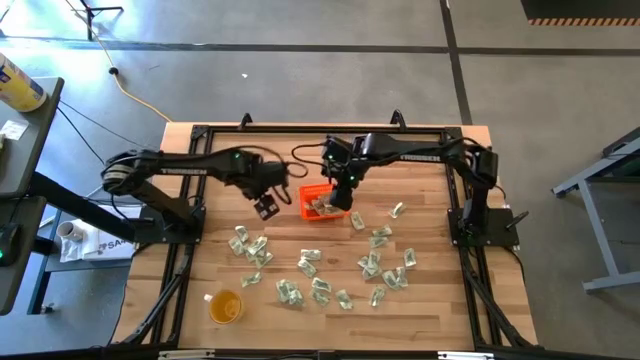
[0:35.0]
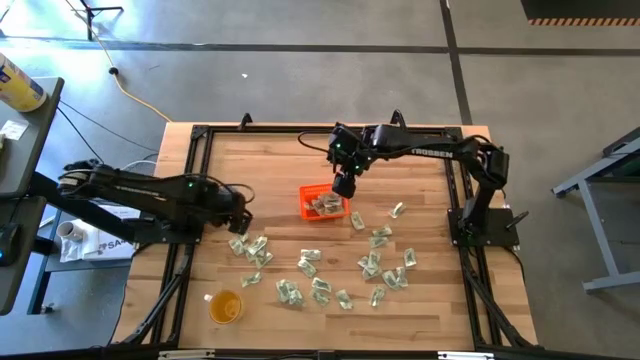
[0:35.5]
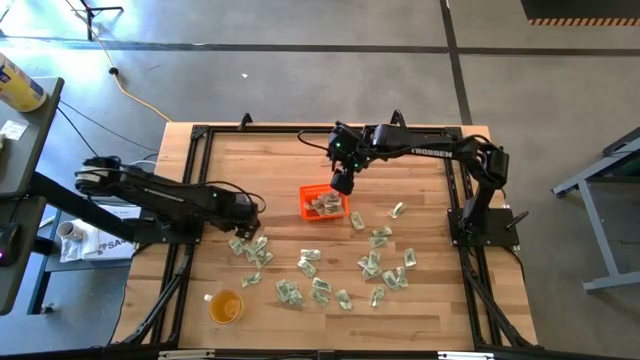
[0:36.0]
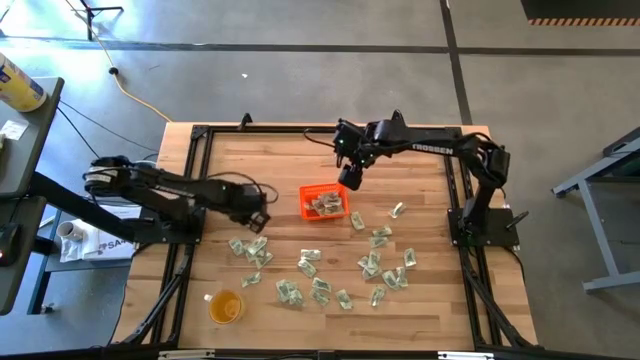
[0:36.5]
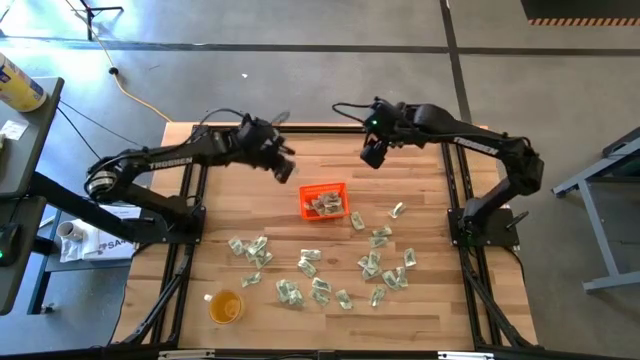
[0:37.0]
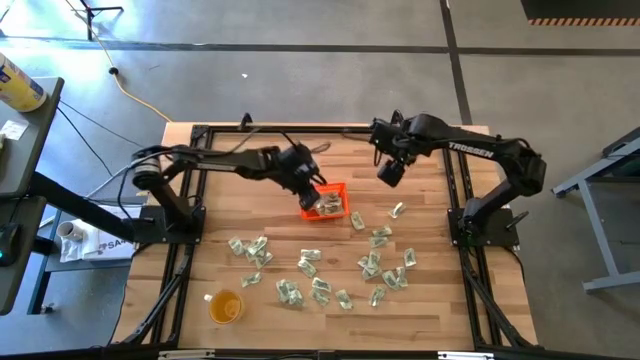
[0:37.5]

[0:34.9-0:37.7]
Task: Pick and place Stevia / Truvia into bins
Put the stevia packet into the basket

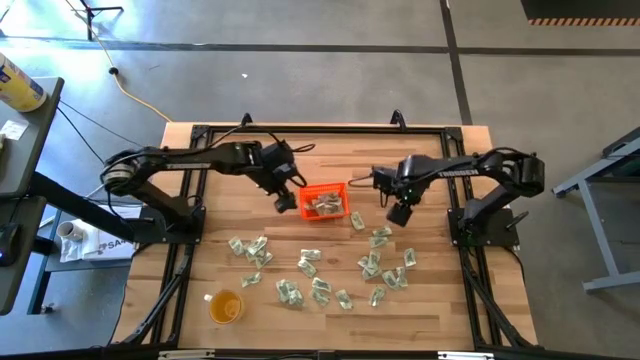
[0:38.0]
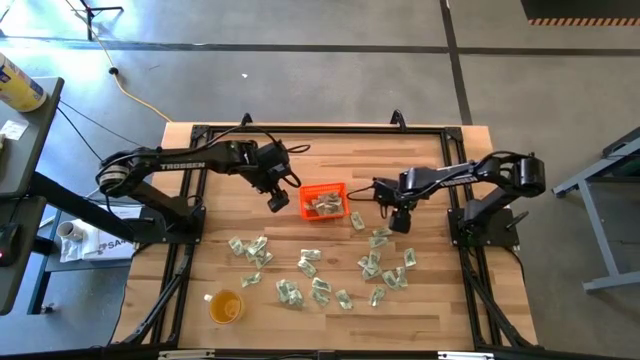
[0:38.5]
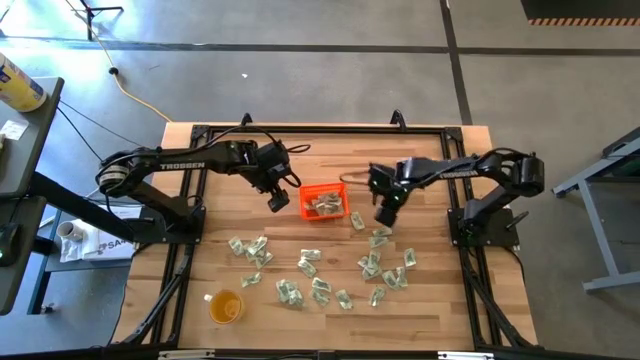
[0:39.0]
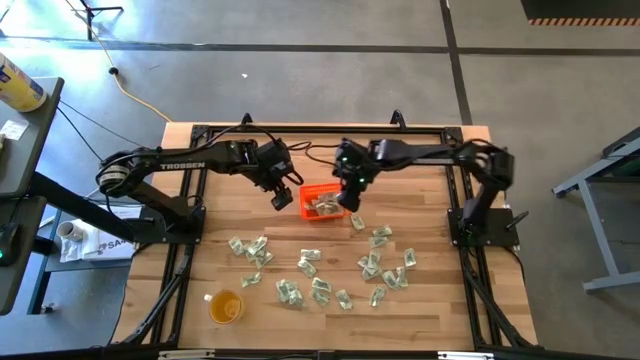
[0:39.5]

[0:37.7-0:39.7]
Put the stevia packet into the basket

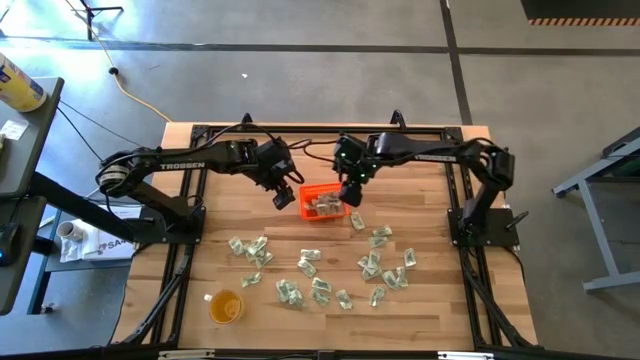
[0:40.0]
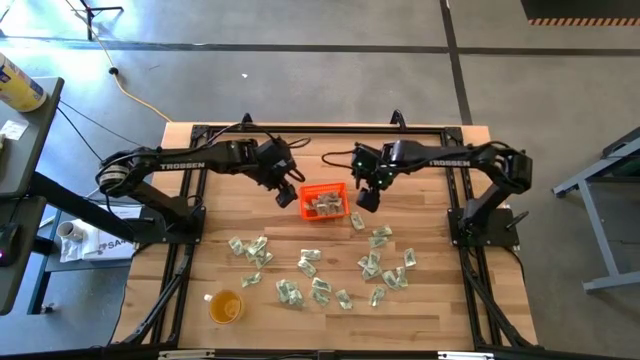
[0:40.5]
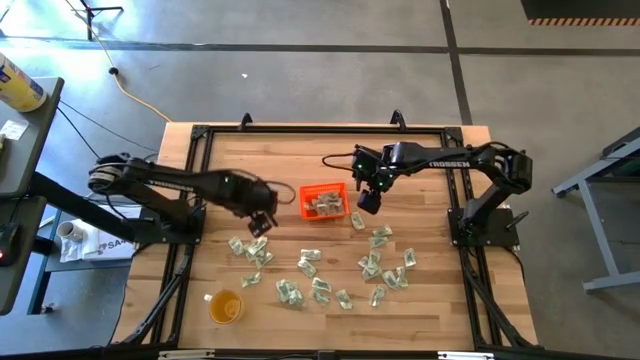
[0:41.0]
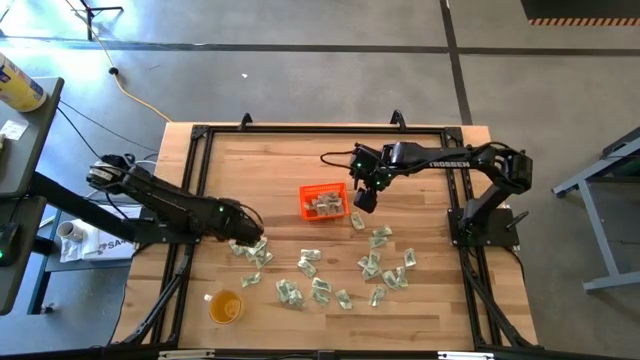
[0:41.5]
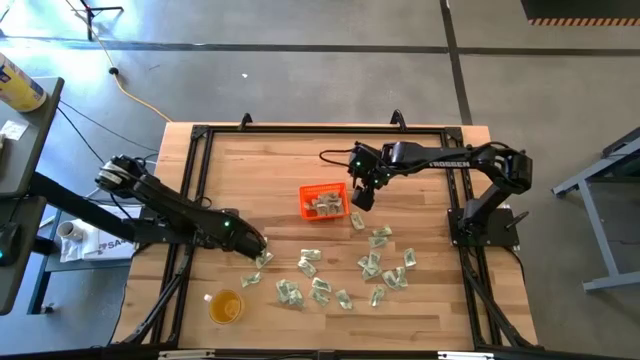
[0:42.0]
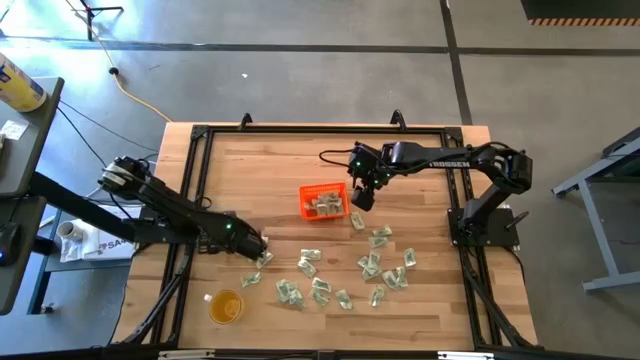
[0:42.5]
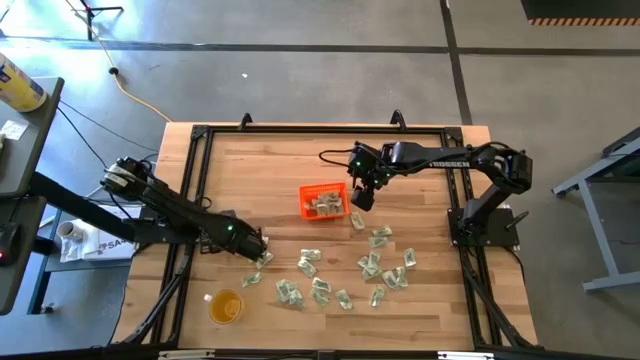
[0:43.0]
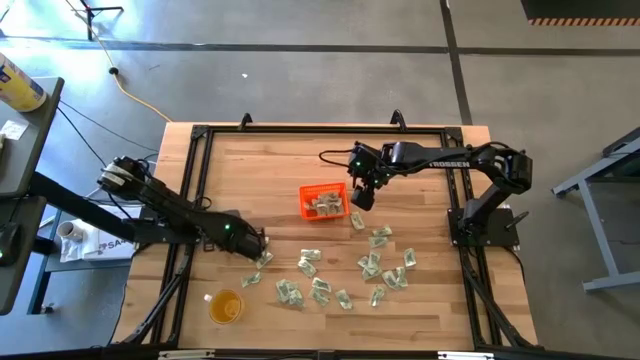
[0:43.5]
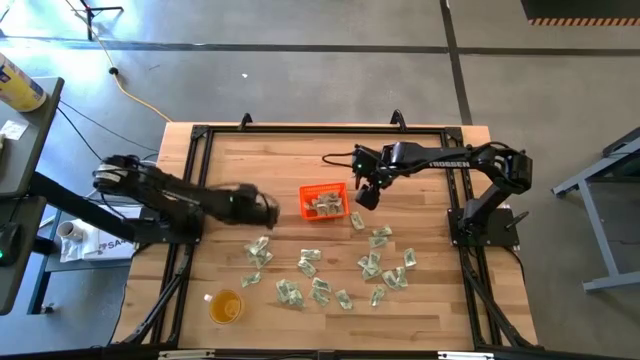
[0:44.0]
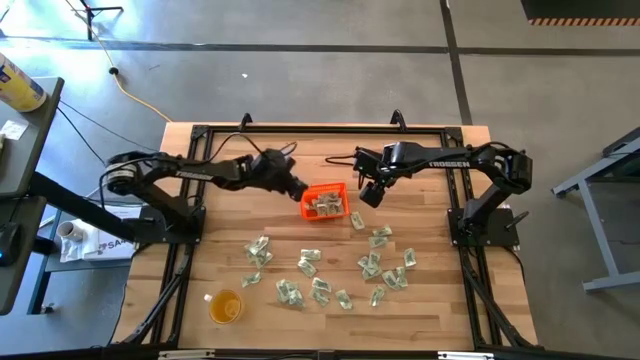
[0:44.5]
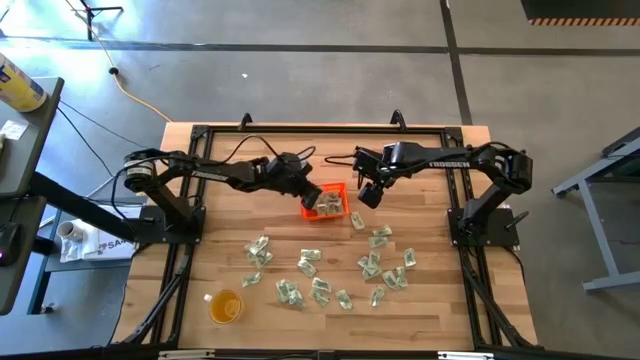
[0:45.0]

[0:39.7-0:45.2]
Put the stevia packet into the basket

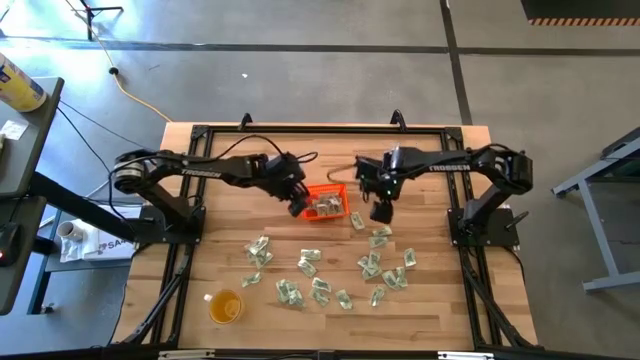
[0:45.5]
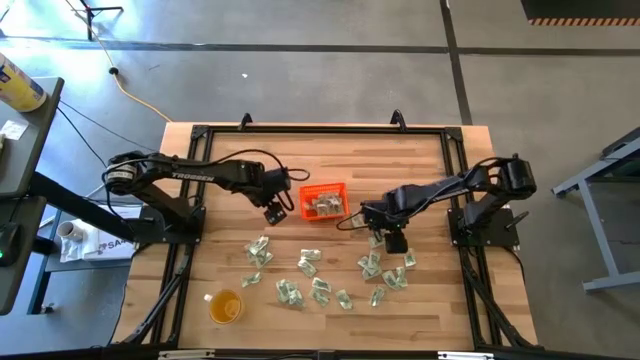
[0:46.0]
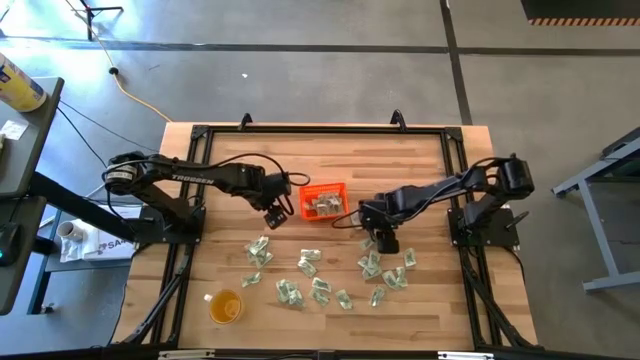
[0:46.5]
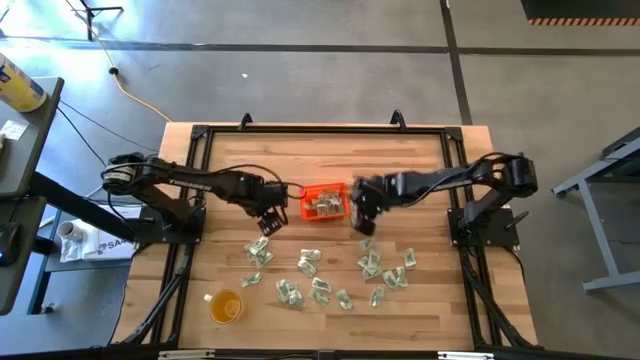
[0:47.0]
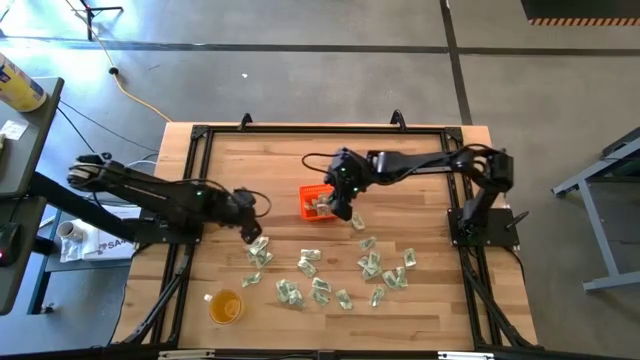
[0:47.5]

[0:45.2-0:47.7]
Put the stevia packet into the basket

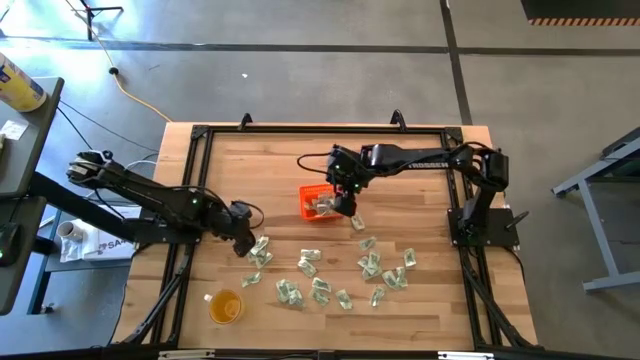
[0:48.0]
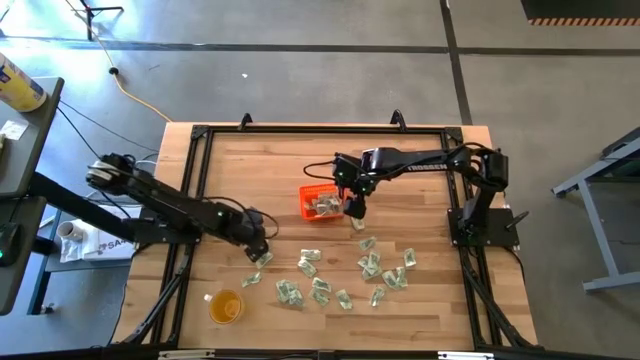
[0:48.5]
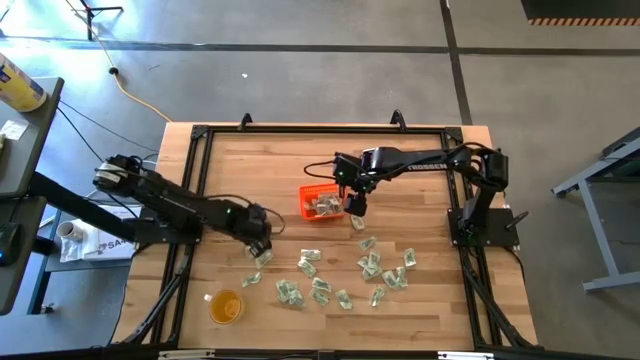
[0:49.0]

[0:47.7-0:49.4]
Put the stevia packet into the basket

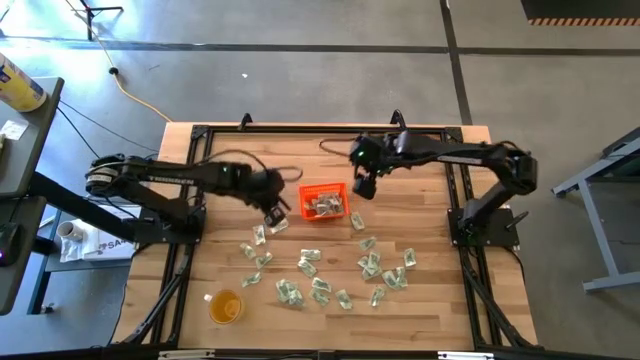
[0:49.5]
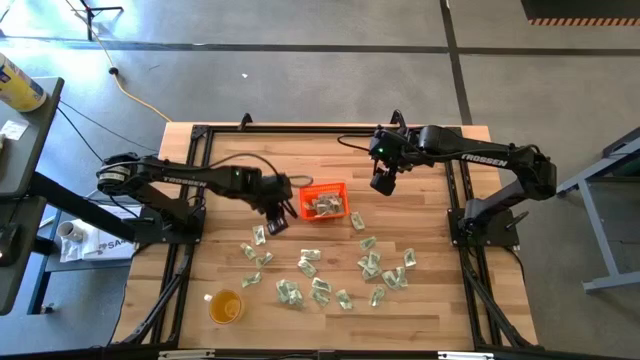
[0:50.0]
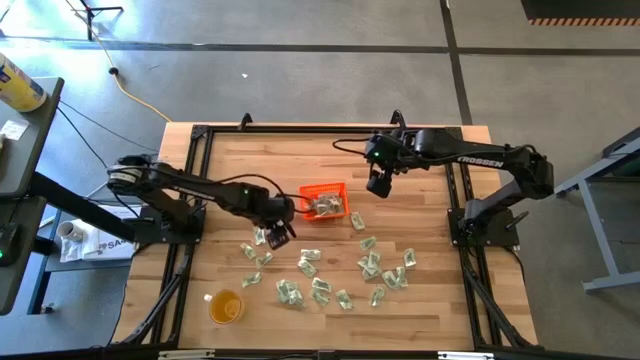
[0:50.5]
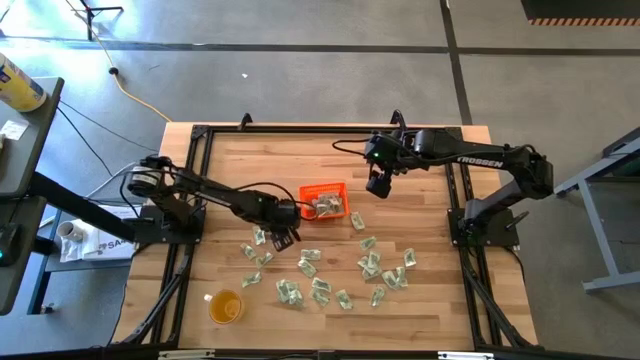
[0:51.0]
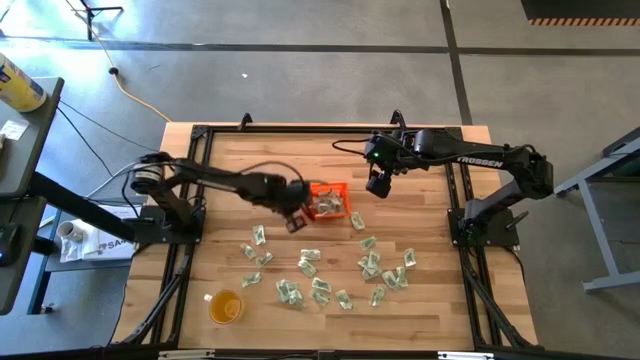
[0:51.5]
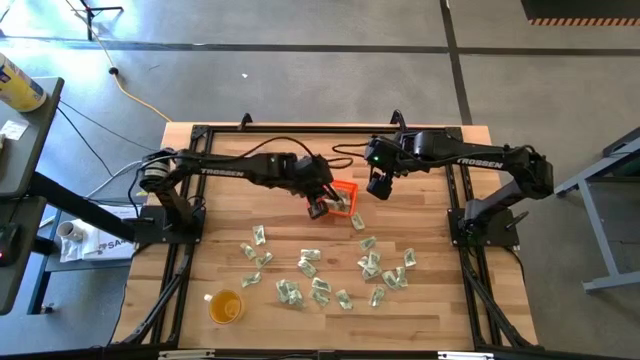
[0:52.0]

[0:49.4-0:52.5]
Put the stevia packet into the basket

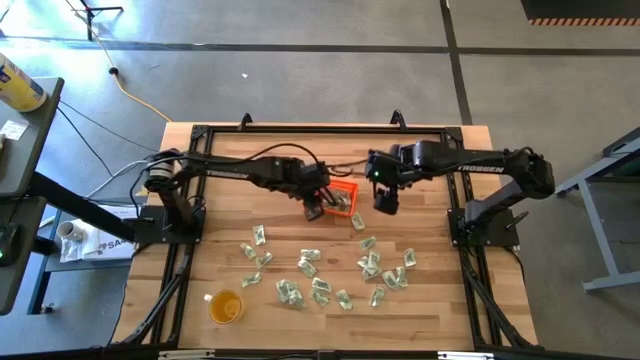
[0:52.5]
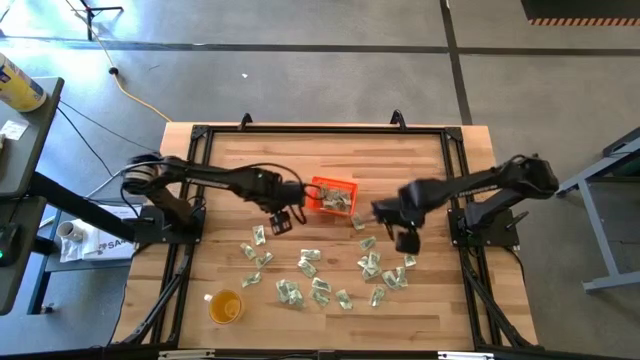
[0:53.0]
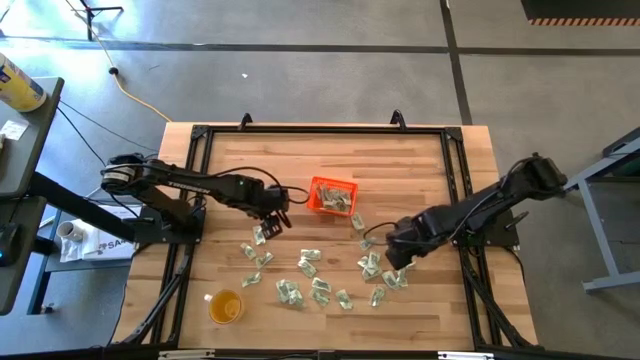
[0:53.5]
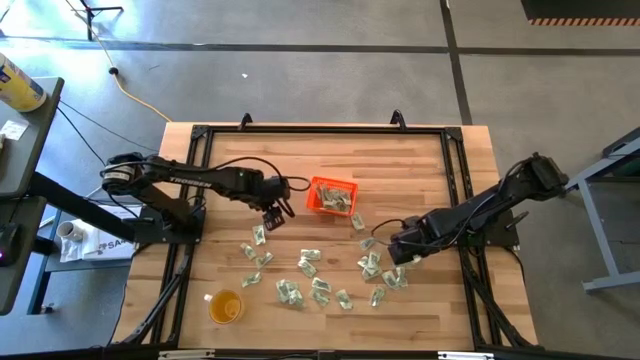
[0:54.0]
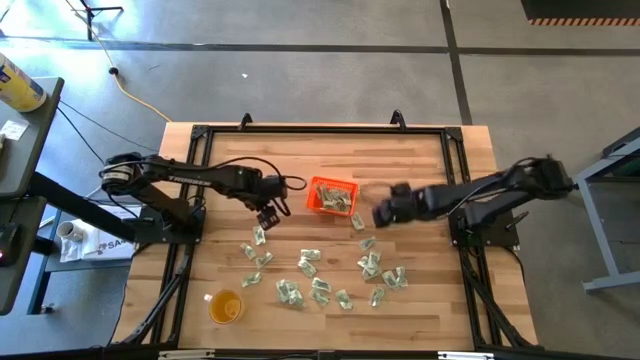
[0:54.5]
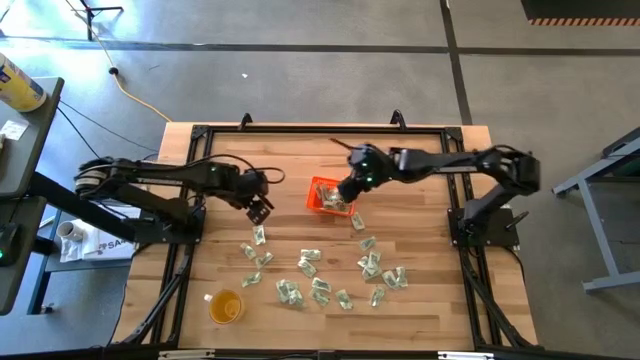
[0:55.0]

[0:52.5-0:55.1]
Put the stevia packet into the basket

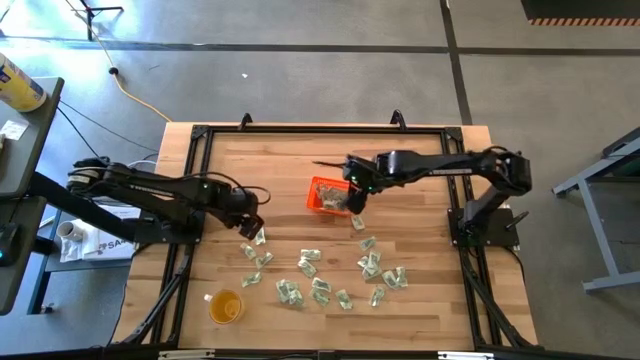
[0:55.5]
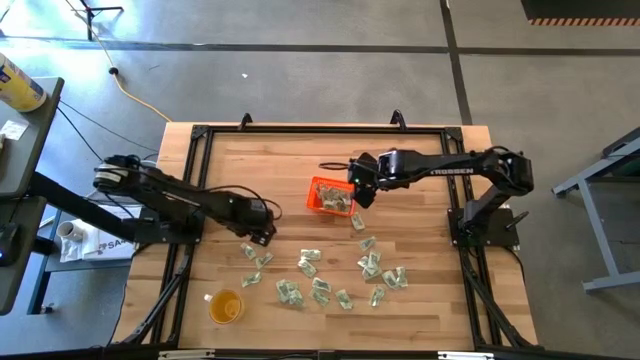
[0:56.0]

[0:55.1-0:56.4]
Put the stevia packet into the basket

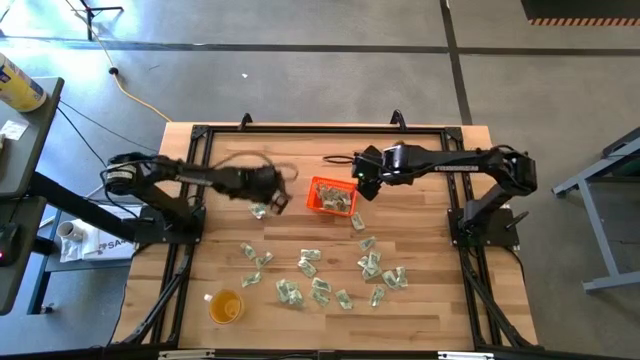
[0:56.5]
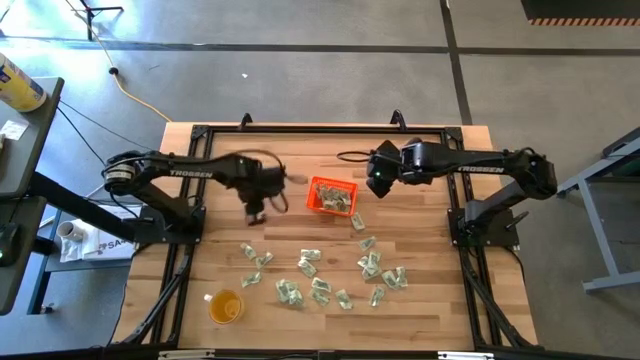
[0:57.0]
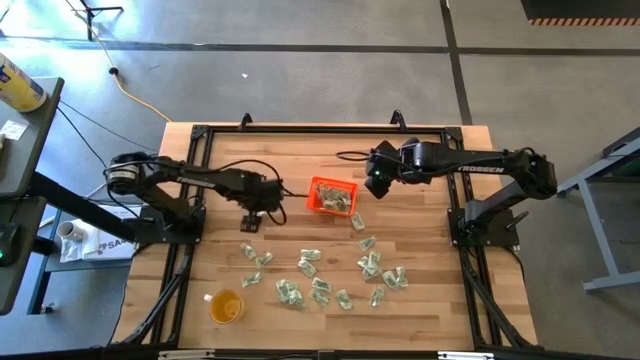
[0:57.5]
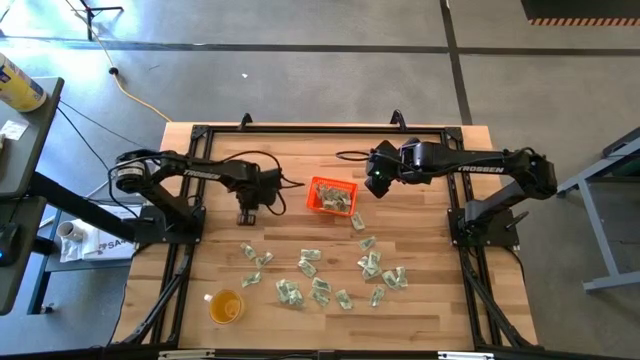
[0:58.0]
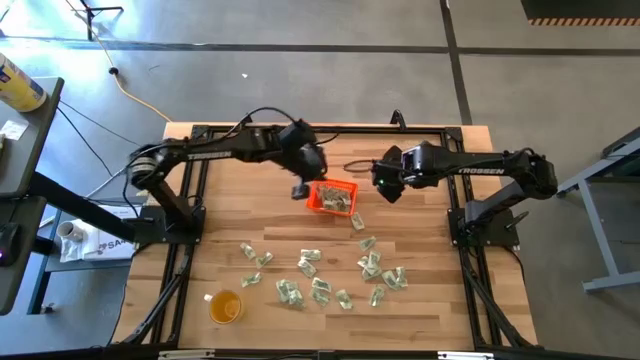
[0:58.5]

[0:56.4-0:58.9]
Put the stevia packet into the basket
